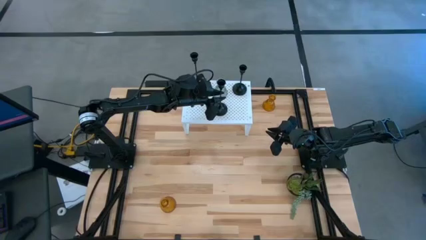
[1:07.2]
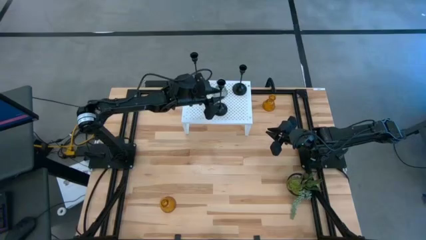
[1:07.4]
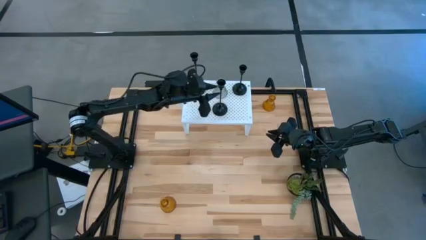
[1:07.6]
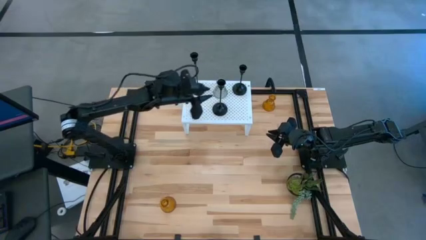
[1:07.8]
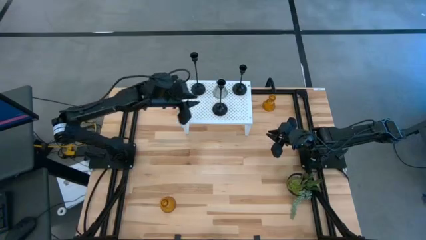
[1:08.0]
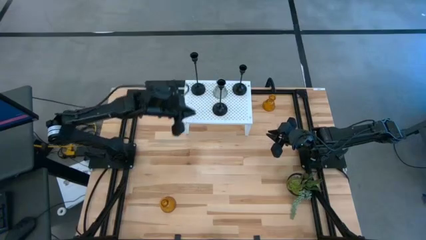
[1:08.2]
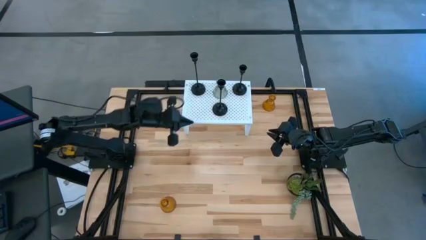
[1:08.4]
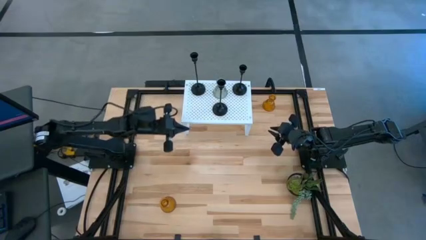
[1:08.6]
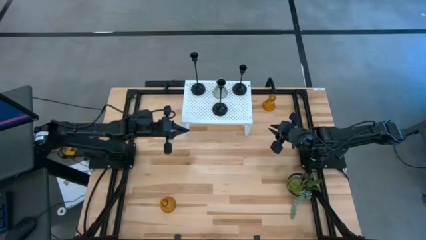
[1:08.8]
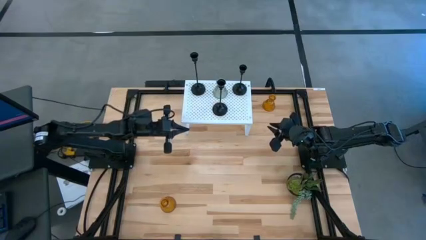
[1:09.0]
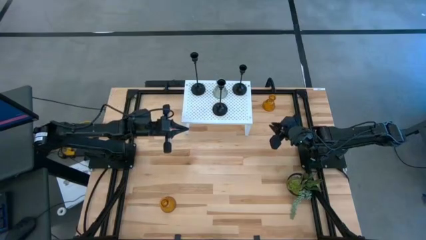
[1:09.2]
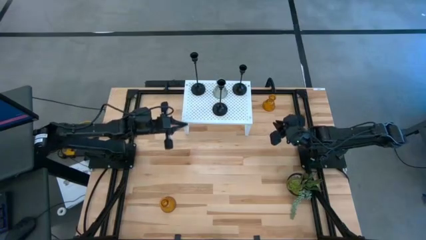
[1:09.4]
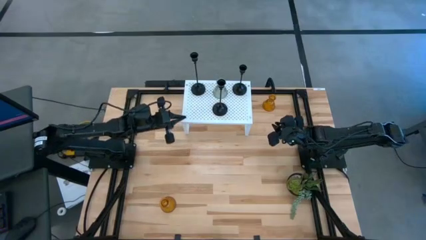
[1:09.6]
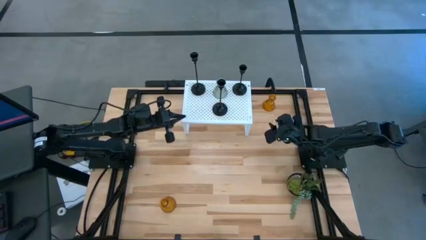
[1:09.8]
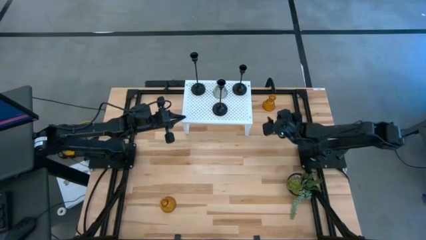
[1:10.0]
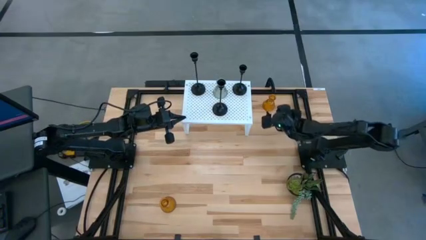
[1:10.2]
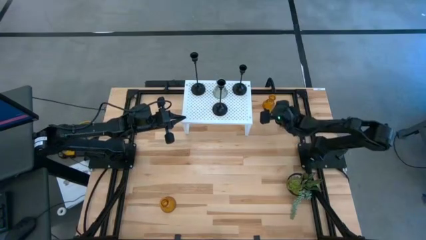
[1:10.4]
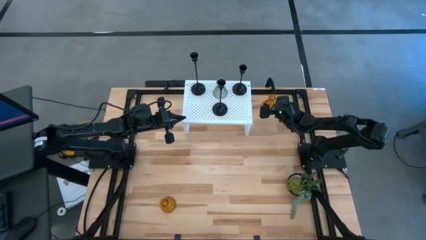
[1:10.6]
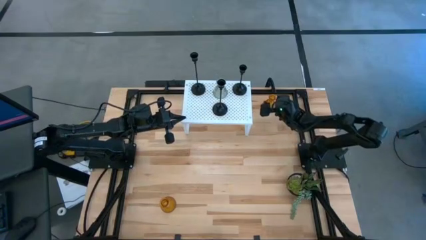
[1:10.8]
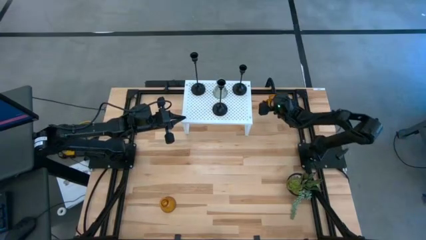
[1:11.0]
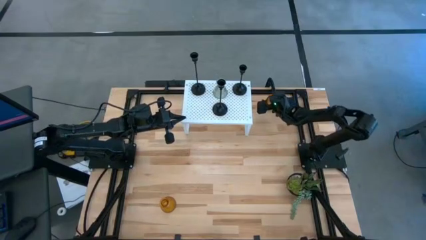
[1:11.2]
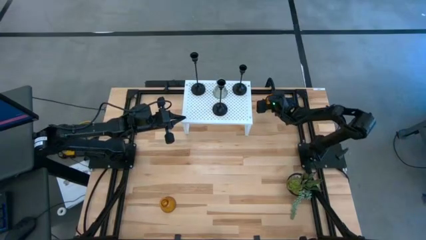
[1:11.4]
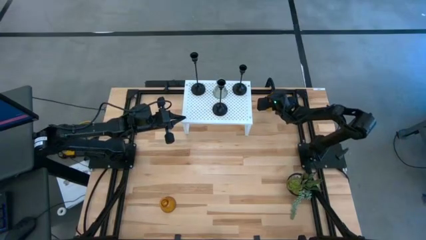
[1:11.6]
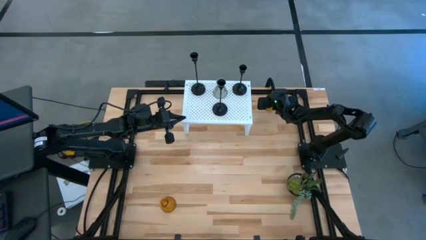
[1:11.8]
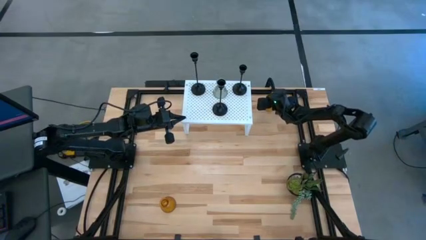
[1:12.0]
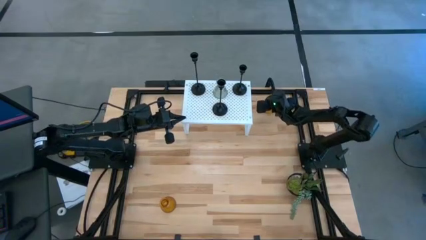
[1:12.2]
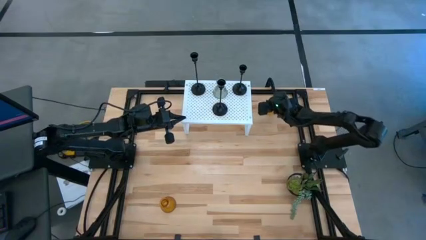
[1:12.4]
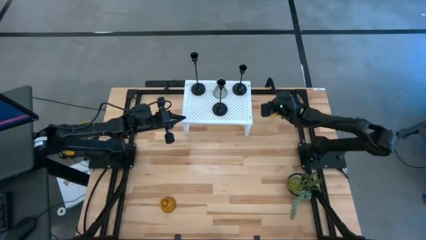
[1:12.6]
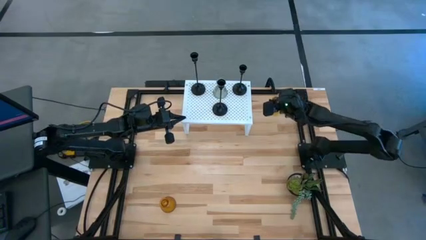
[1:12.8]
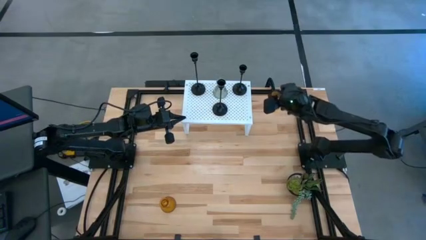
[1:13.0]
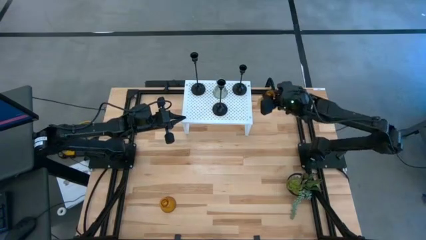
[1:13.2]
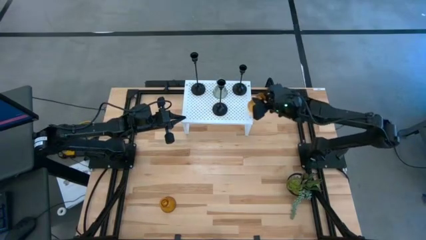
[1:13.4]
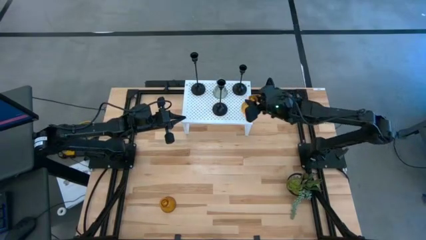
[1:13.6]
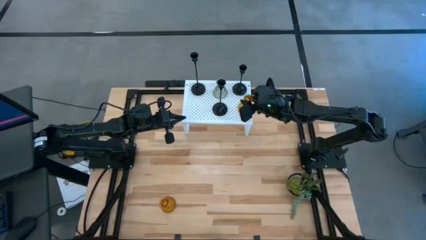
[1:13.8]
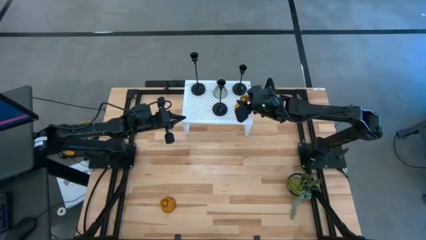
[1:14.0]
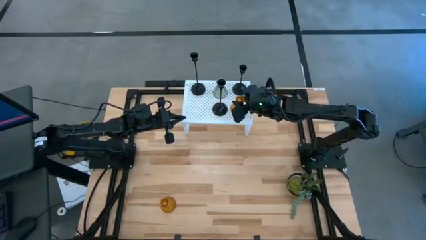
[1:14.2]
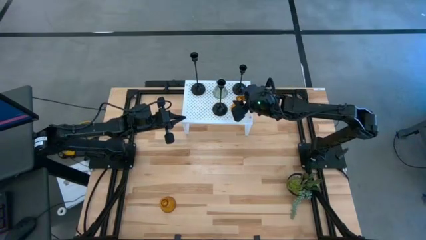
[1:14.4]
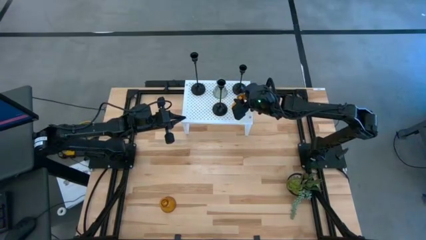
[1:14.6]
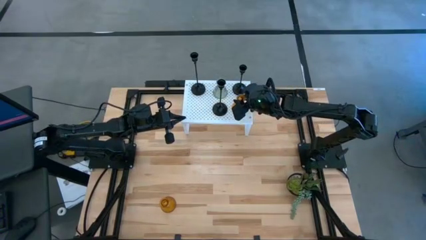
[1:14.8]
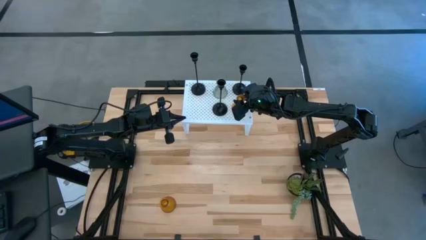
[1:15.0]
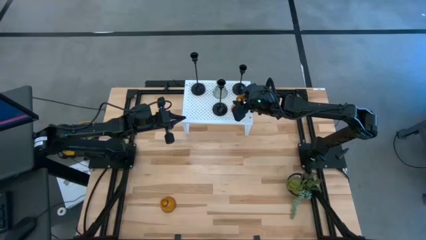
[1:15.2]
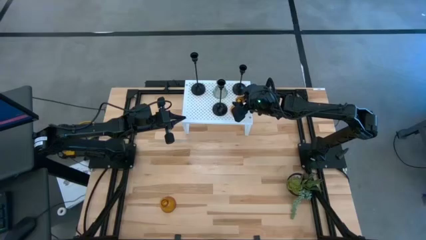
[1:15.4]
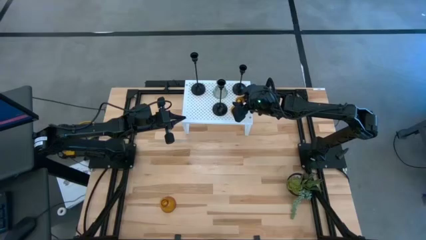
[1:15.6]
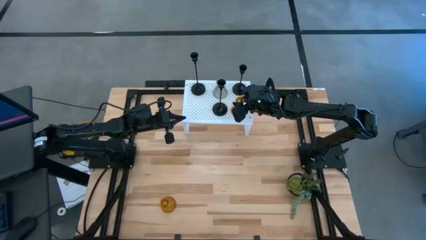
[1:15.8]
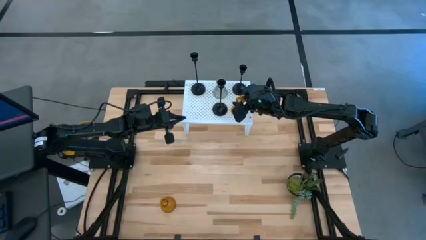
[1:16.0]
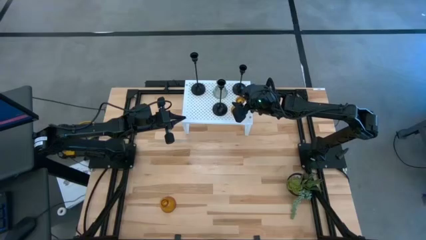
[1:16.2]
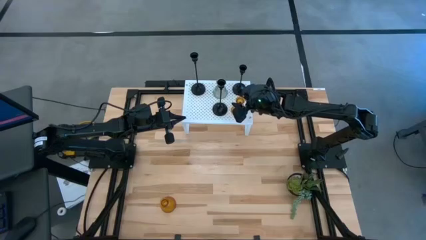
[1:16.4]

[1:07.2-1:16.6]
Task: Pick & Place candle stick holders
Put the top yellow glass candle holder on the shelf

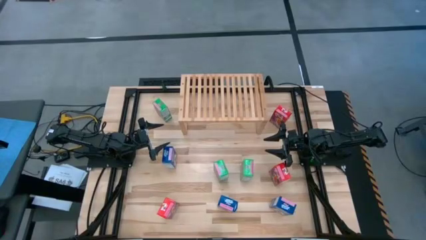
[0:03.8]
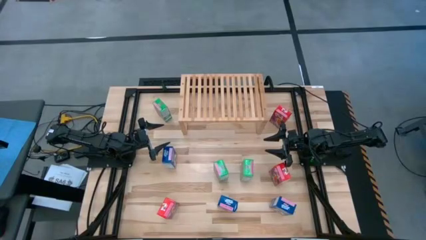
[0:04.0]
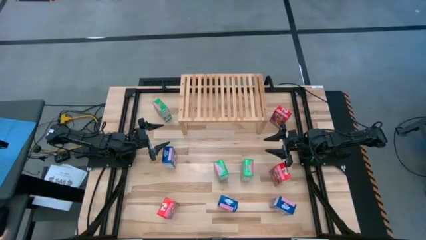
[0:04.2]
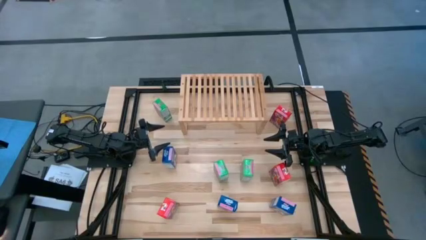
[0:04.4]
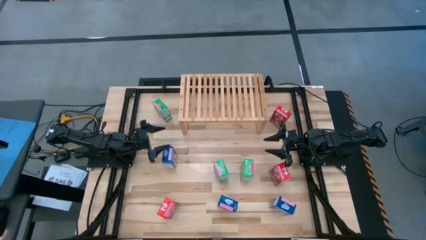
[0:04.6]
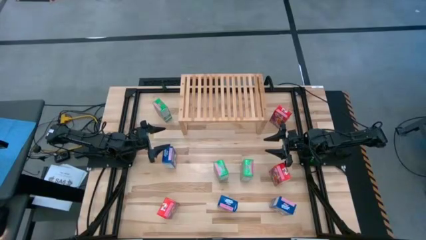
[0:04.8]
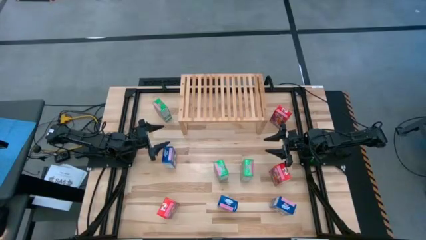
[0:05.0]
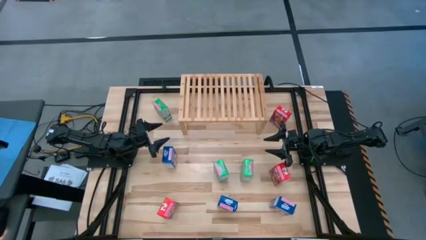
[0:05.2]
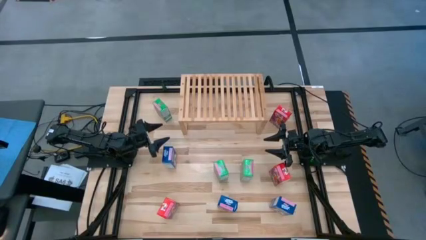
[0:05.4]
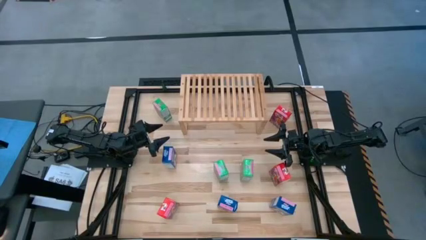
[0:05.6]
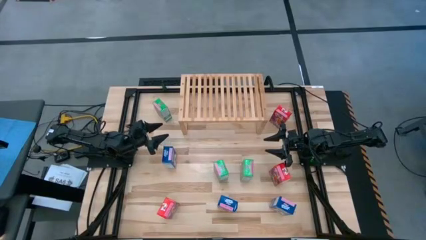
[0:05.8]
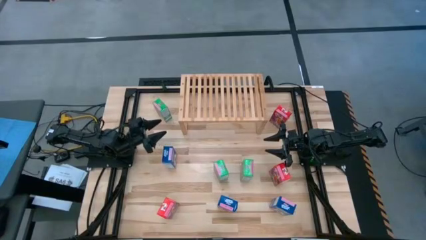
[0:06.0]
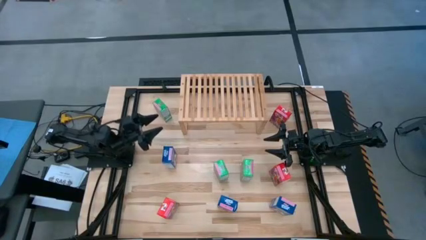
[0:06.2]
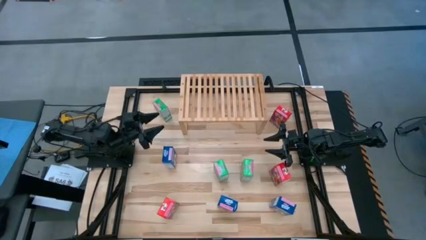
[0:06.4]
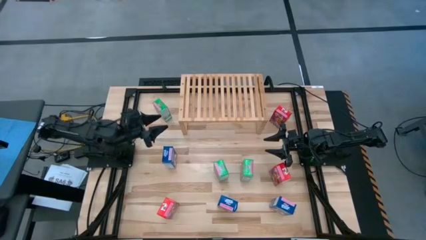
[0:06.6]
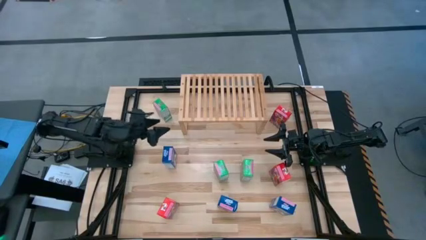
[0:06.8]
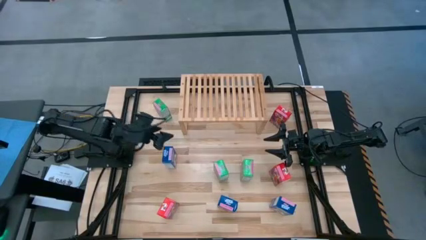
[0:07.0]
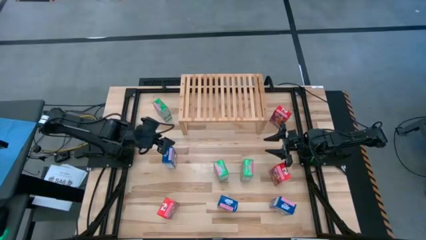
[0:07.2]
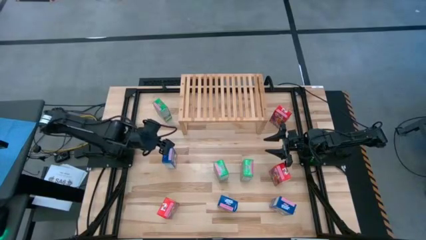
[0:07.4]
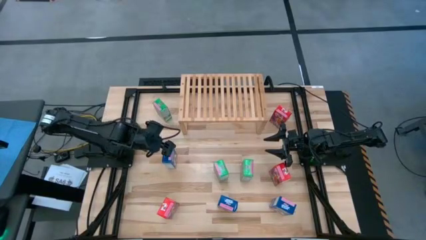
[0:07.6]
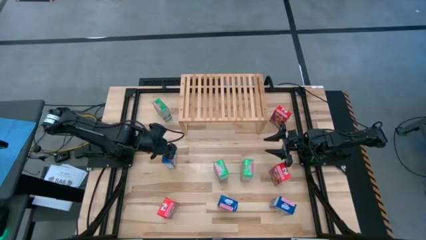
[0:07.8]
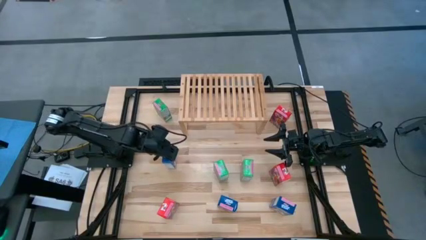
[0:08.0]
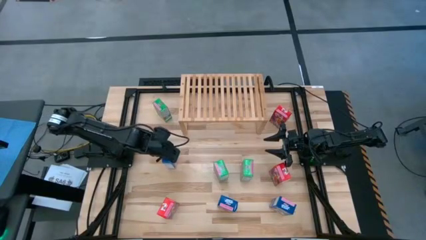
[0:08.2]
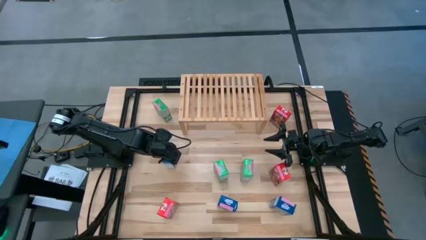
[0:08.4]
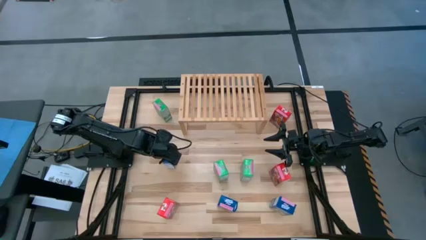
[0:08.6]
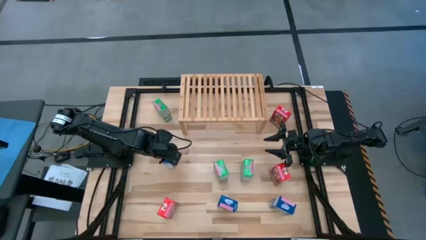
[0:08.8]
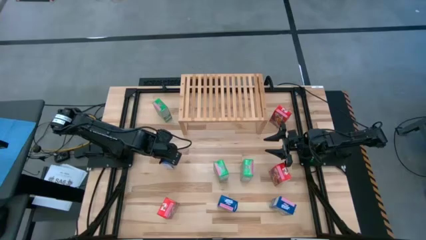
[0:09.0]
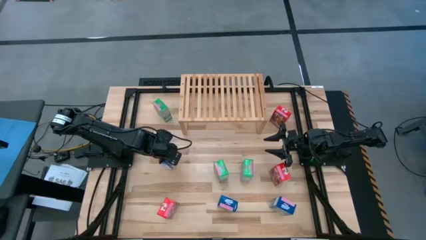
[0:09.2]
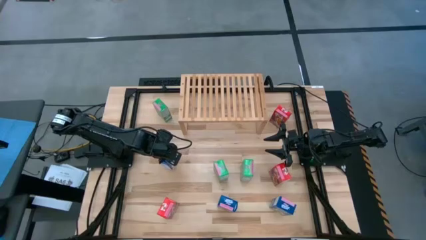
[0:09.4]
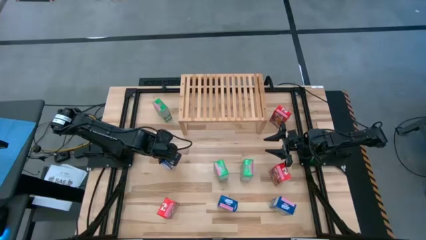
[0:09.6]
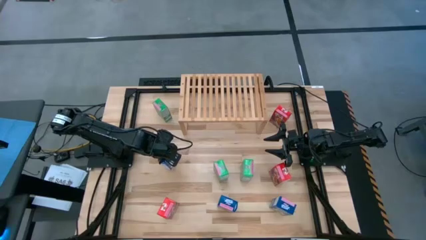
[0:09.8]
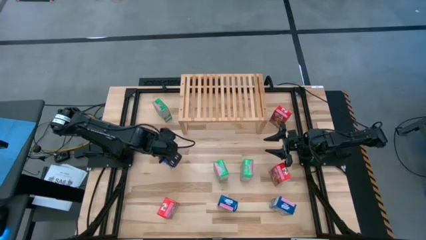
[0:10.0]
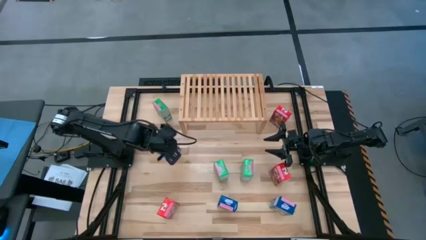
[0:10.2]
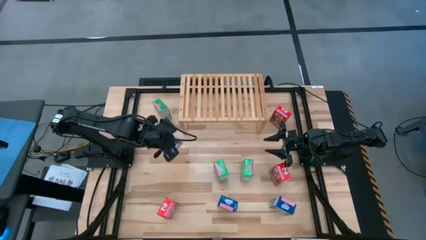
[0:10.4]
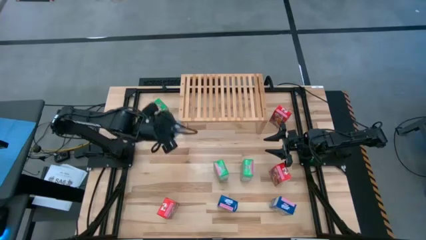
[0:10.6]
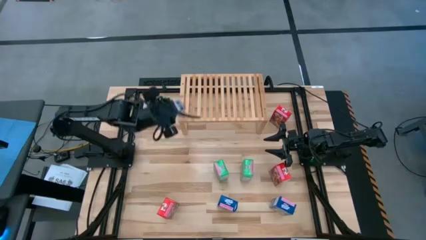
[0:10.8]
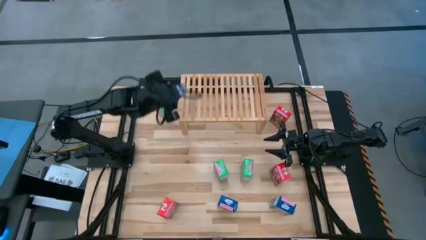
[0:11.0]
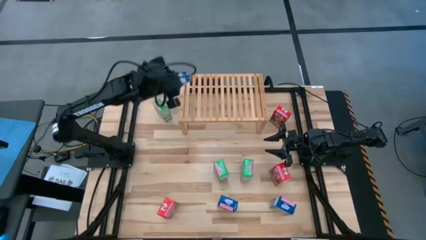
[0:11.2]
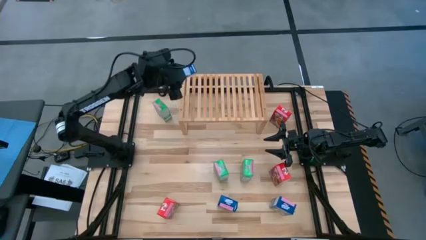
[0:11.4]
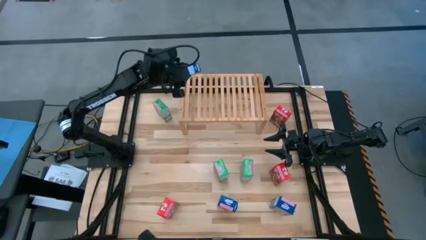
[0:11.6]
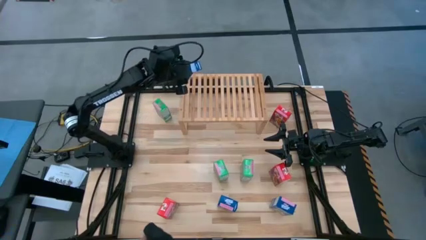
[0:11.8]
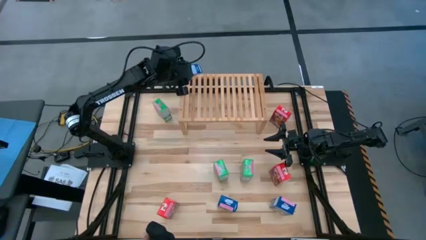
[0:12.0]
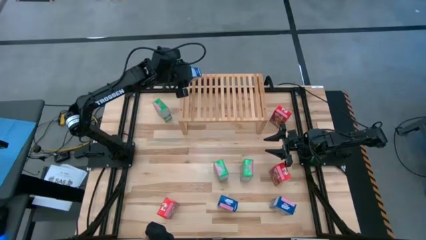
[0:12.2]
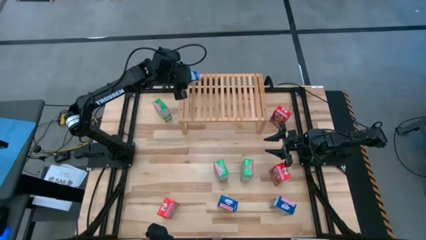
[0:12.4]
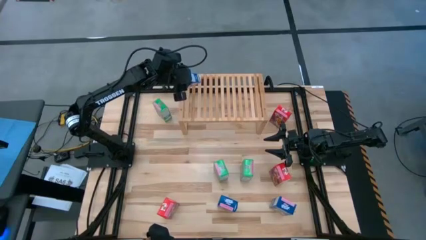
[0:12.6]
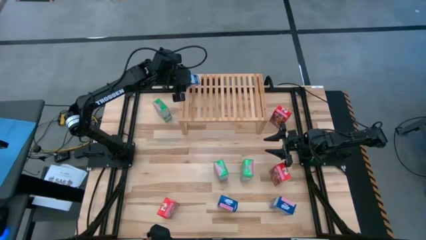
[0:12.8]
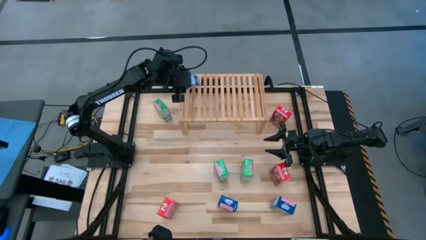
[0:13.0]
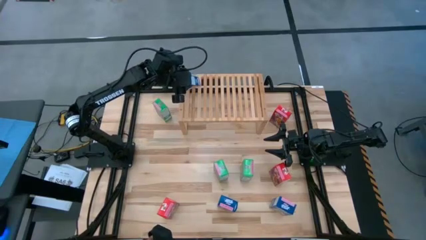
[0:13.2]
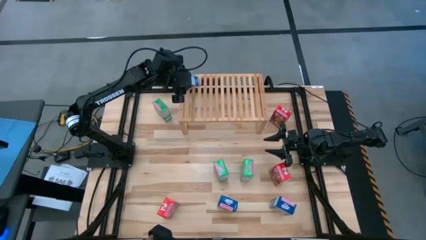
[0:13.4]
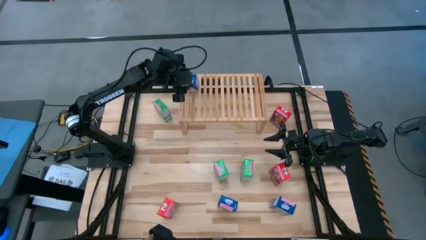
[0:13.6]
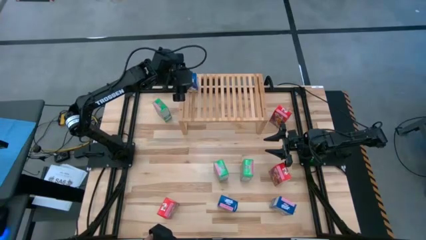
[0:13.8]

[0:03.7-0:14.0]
Task: Stack cereal on shelf
Put the top blue cereal box on the shelf
